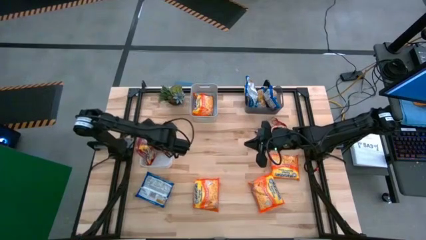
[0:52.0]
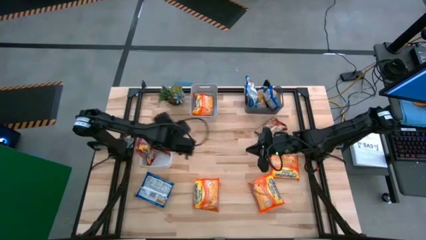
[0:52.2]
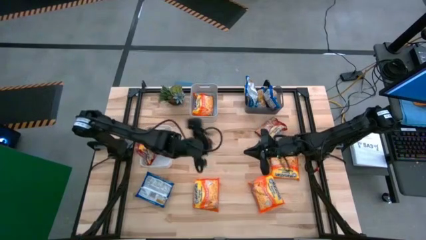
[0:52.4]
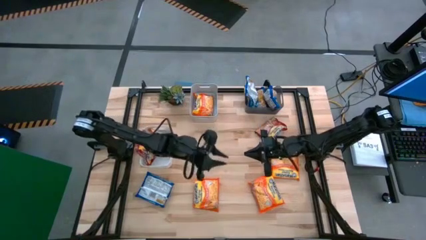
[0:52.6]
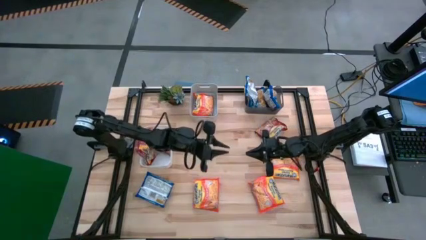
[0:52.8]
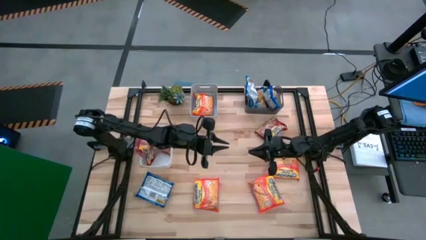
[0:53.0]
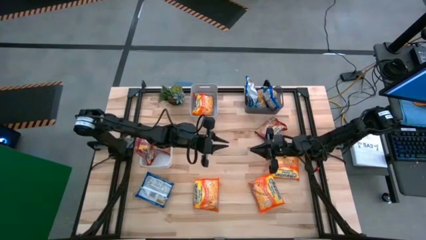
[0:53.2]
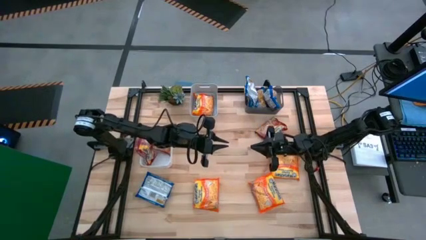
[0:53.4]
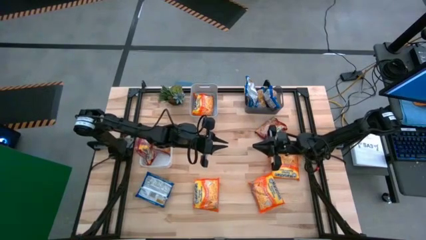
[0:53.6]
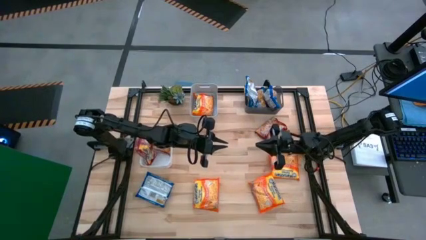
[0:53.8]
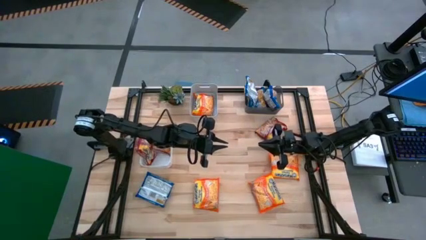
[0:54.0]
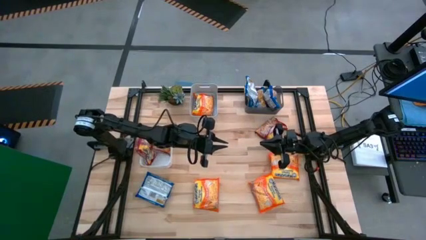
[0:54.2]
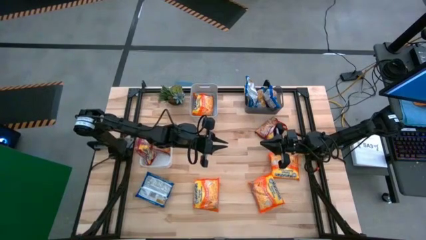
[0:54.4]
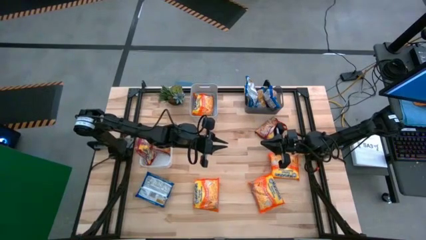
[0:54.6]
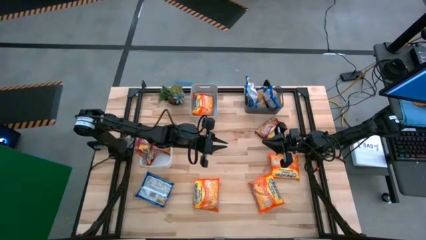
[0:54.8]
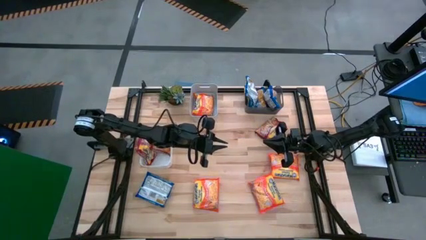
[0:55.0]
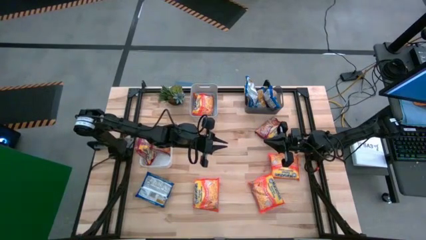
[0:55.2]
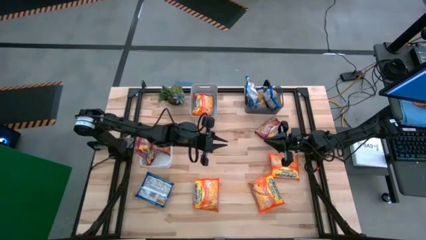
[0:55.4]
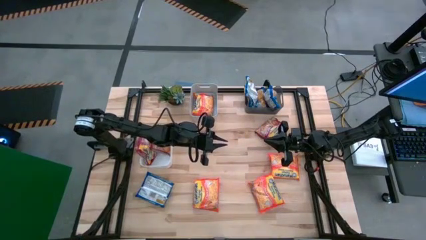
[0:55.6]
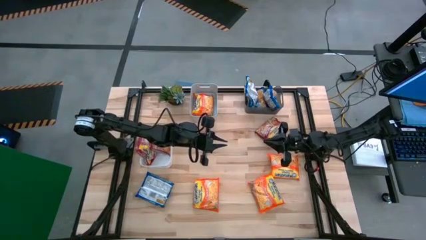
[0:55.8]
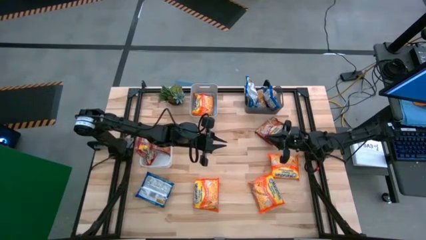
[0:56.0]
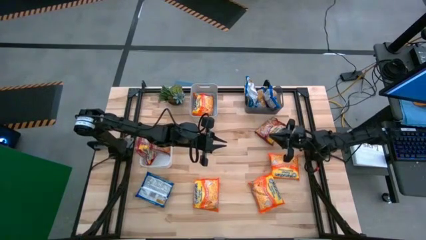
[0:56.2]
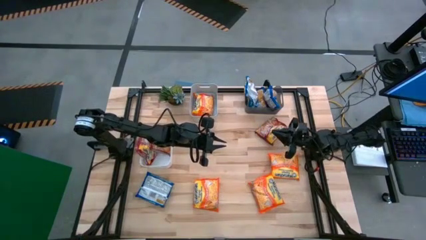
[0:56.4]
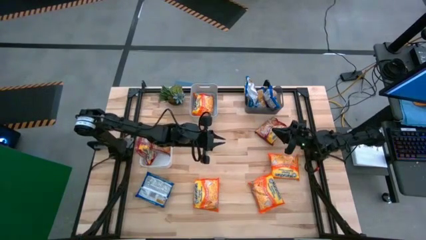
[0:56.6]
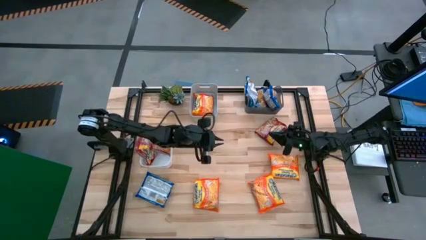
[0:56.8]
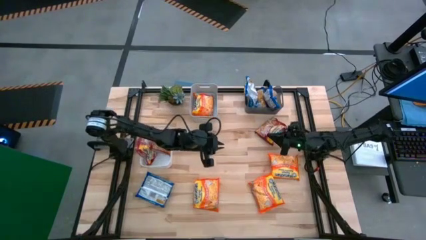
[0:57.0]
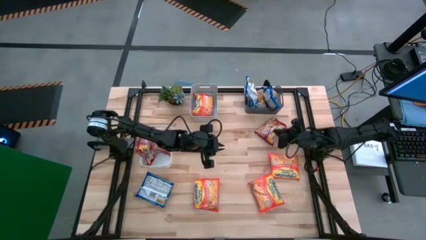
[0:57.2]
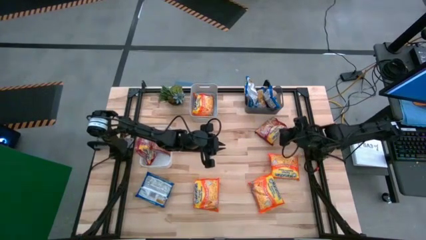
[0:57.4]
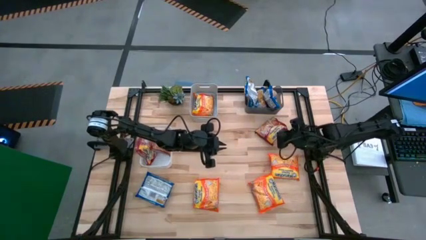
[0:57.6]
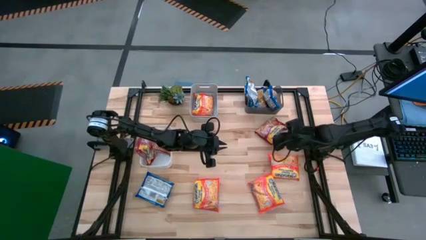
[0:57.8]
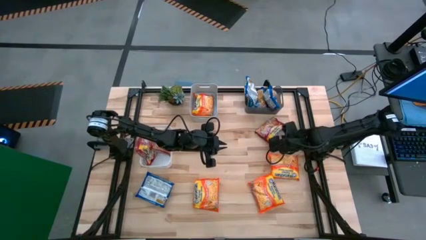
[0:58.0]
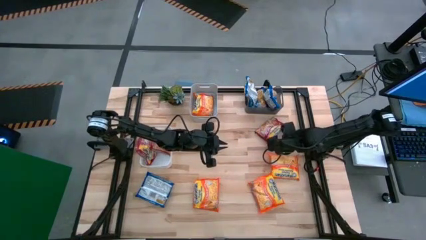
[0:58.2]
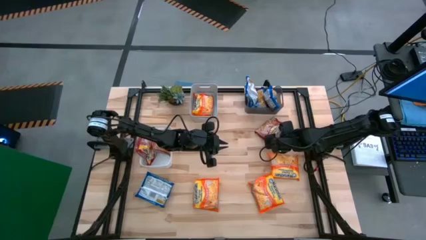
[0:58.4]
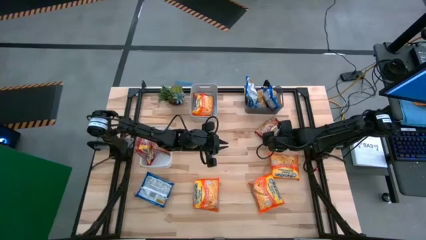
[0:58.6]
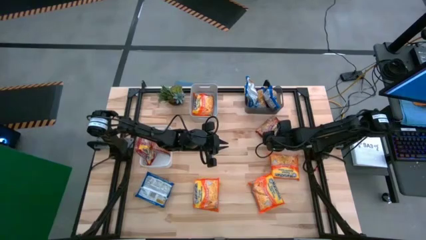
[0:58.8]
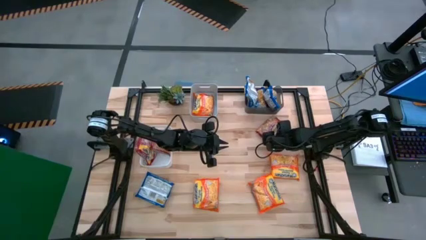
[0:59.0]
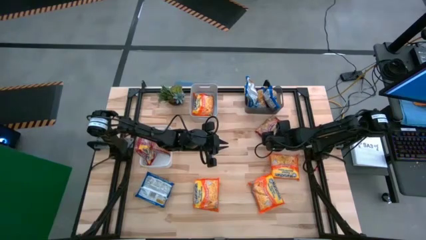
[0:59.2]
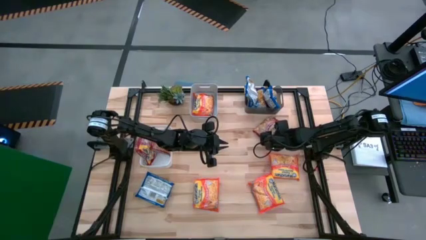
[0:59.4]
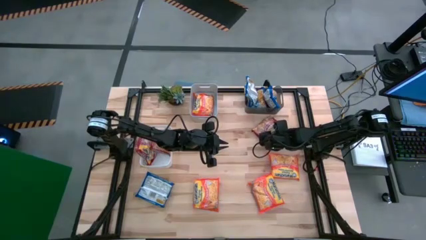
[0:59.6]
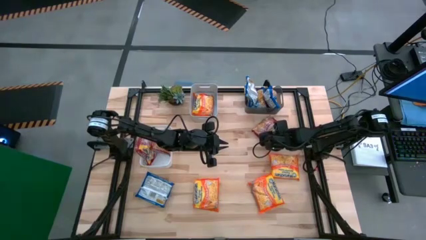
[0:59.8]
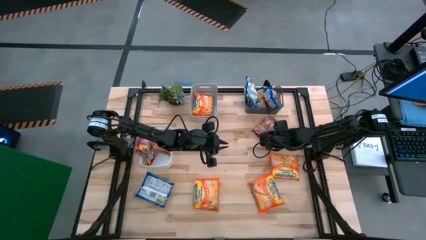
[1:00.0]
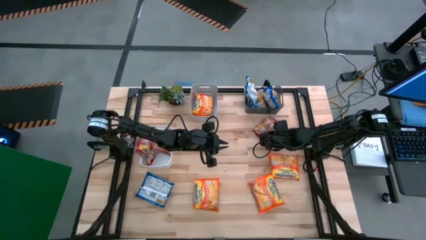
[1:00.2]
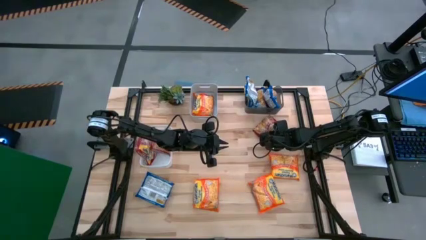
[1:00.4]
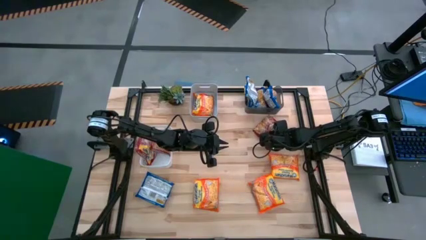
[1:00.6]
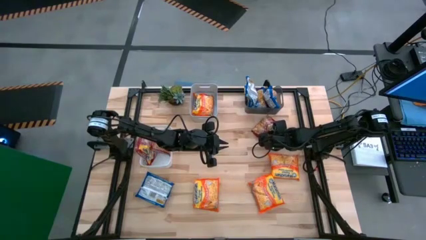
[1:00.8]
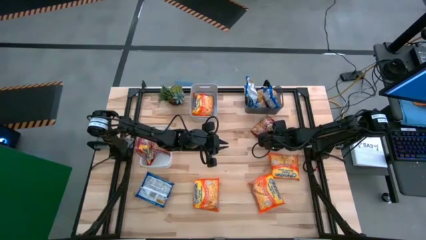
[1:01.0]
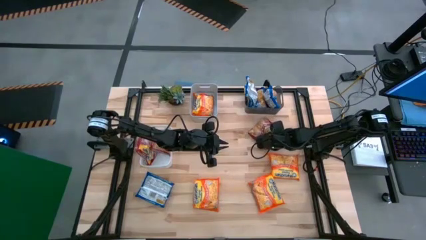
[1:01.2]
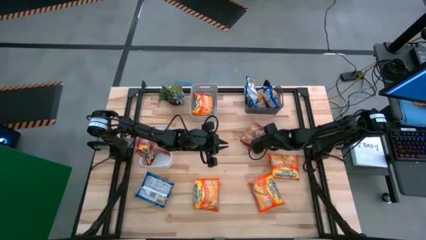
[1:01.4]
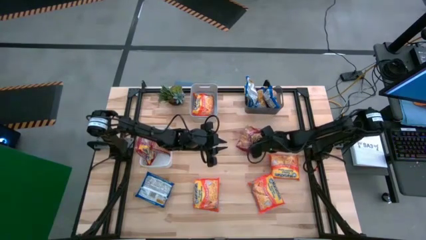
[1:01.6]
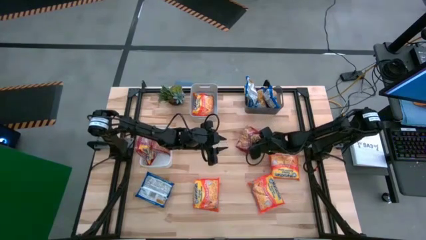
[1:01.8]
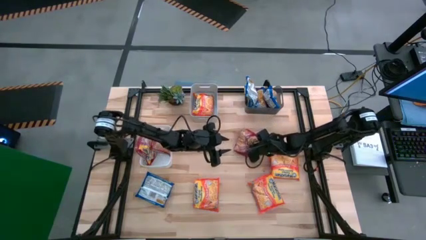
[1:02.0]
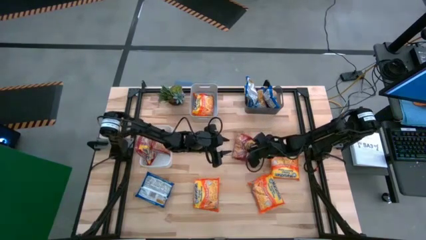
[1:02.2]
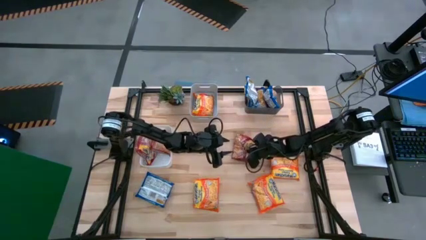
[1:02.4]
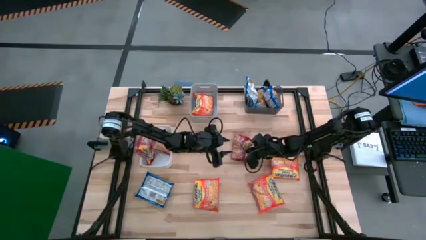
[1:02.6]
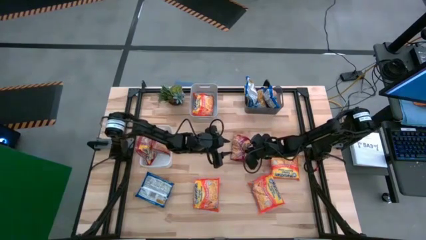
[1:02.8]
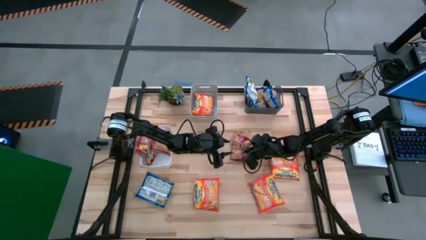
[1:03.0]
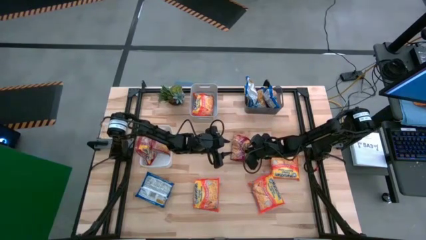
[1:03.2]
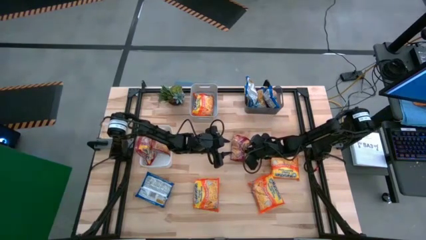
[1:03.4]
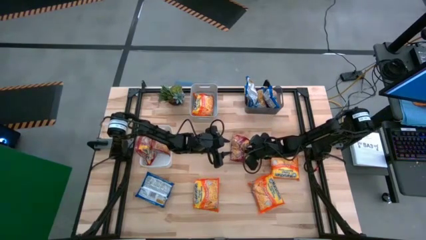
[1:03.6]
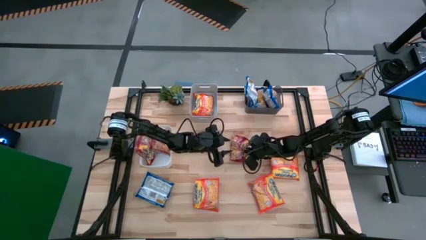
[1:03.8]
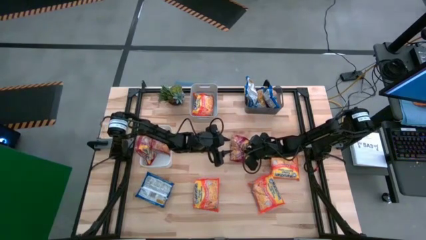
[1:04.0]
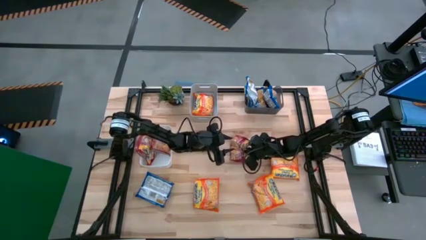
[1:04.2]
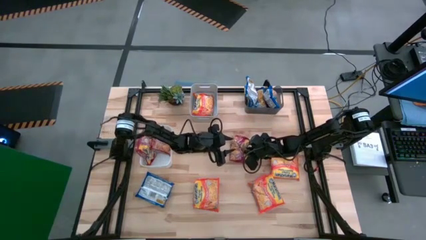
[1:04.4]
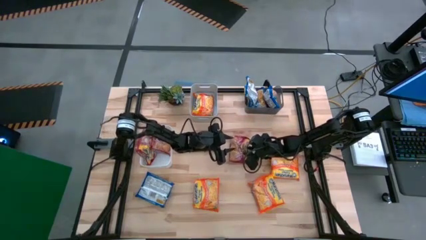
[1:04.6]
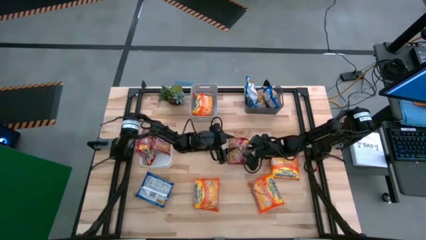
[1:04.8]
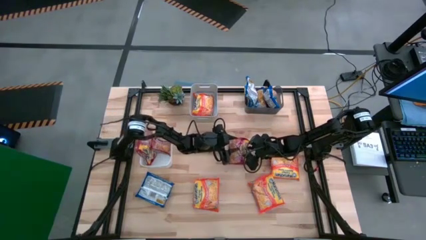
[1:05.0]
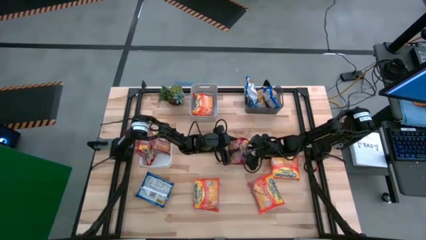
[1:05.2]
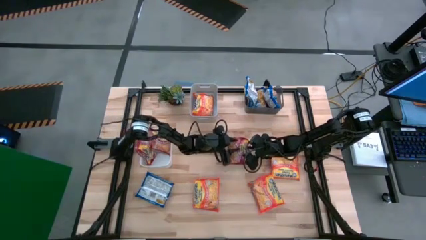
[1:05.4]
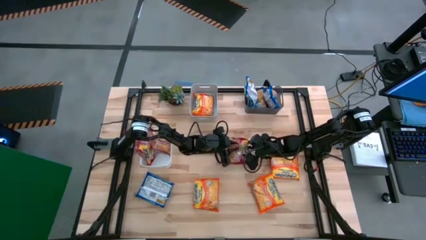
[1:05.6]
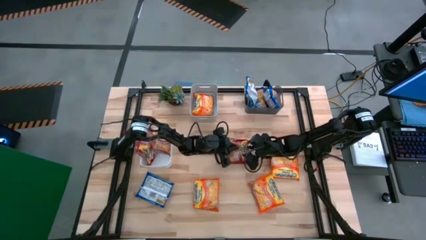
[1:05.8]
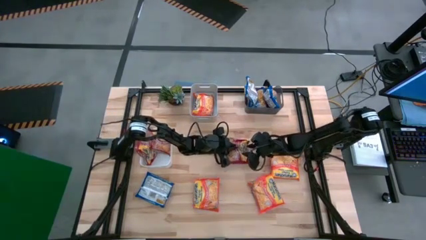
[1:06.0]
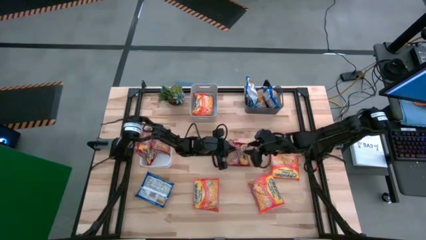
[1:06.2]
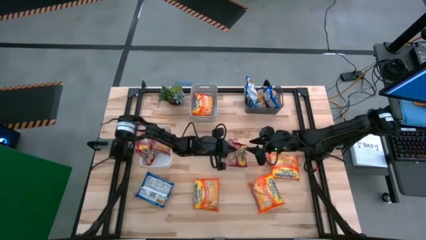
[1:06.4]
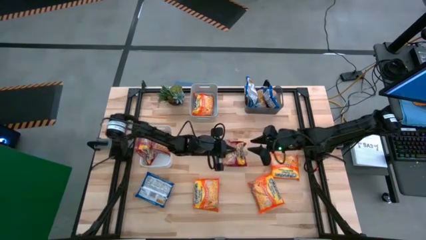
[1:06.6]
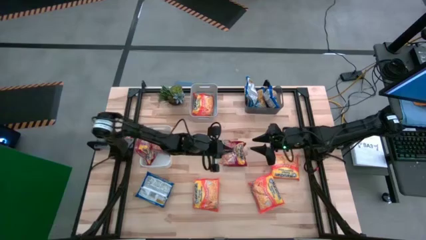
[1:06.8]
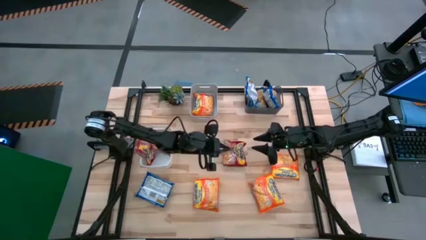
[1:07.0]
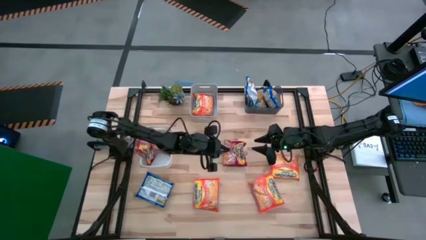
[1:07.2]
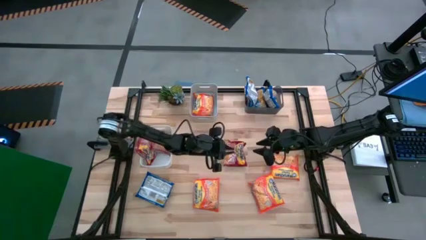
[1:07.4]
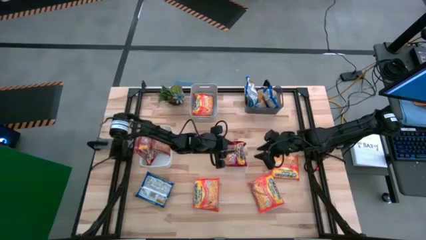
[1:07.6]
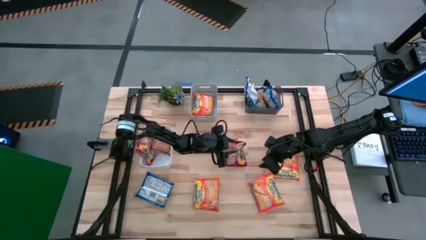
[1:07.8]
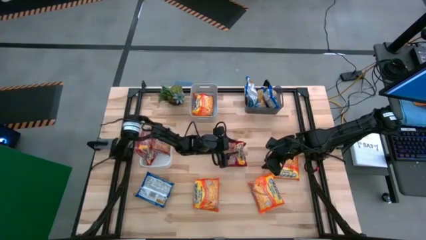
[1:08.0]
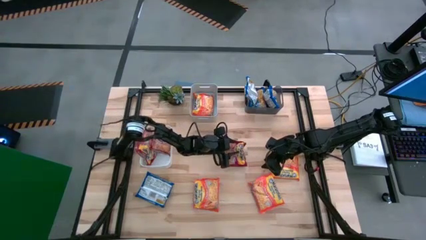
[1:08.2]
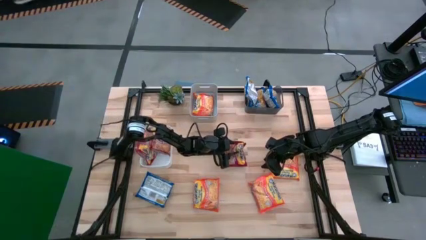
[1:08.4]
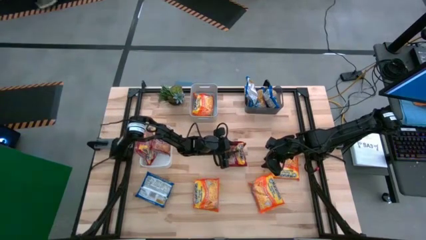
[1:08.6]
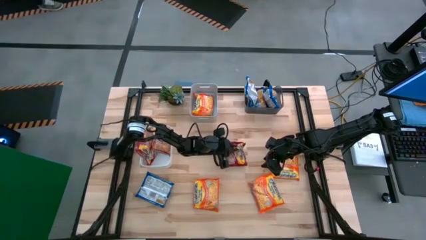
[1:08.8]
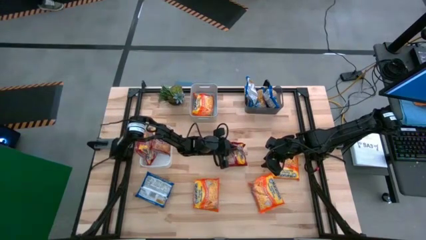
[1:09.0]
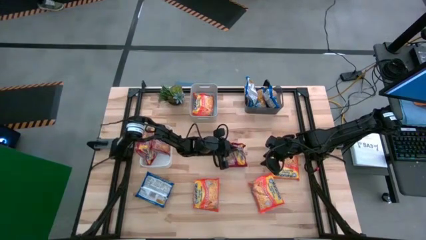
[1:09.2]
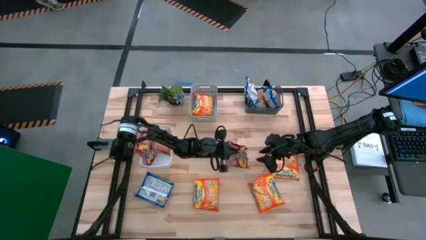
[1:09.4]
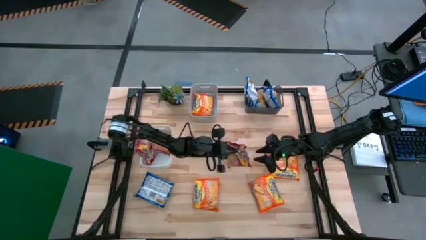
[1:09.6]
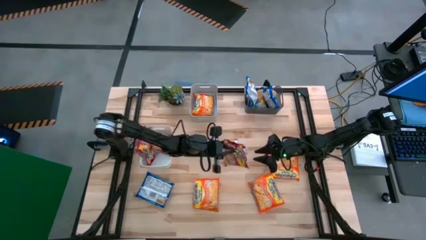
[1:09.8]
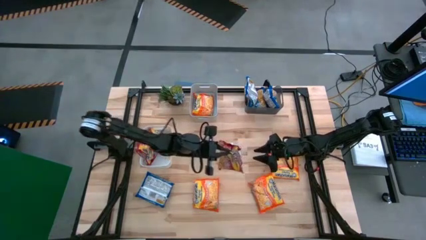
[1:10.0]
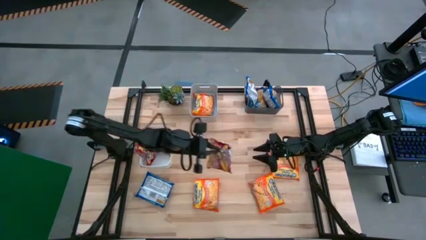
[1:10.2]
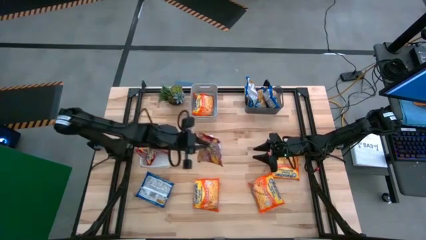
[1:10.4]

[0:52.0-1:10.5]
Task: Sort Maruchan noodles
Put the red noodle pack into the white bin
